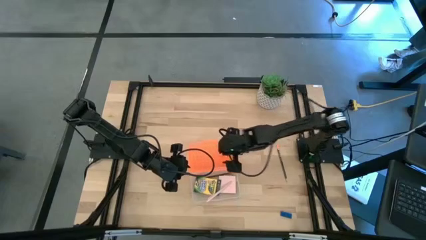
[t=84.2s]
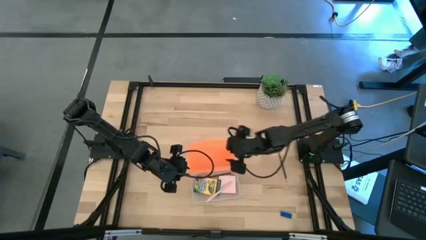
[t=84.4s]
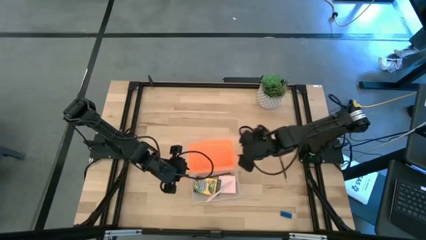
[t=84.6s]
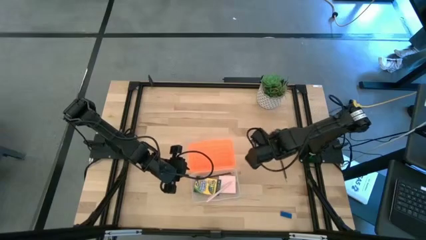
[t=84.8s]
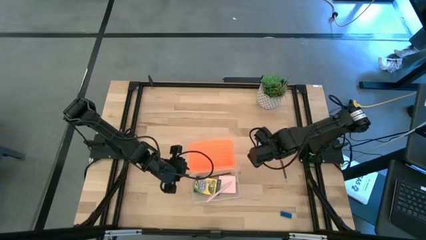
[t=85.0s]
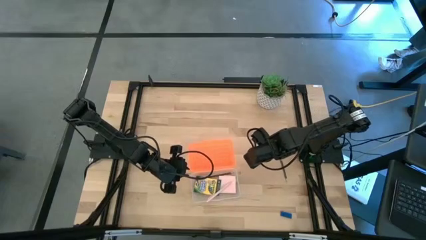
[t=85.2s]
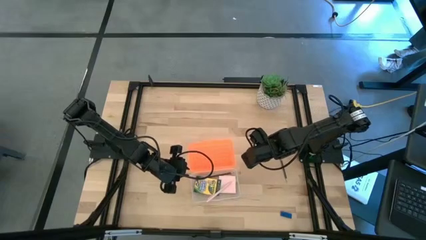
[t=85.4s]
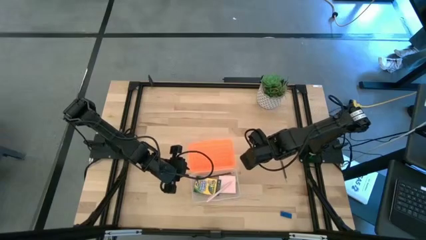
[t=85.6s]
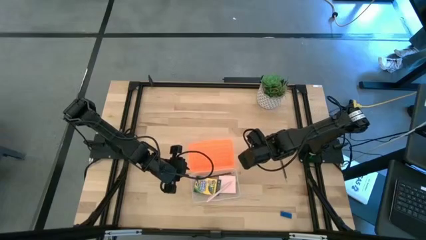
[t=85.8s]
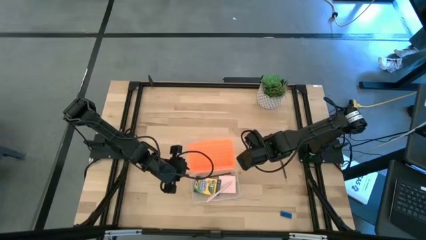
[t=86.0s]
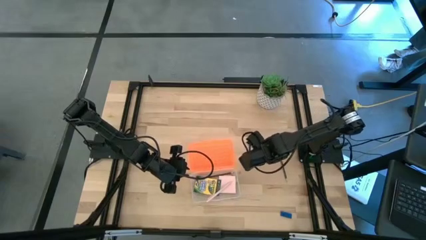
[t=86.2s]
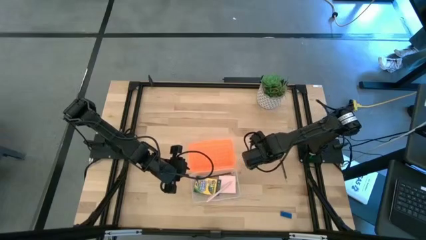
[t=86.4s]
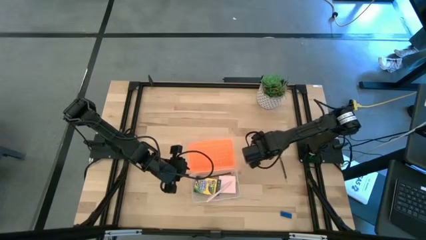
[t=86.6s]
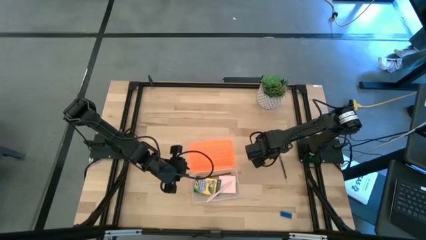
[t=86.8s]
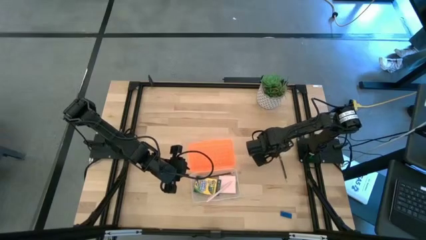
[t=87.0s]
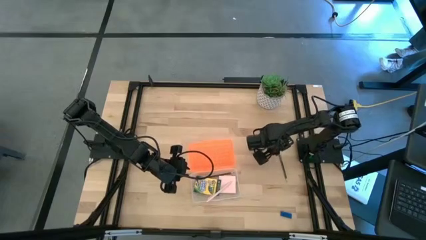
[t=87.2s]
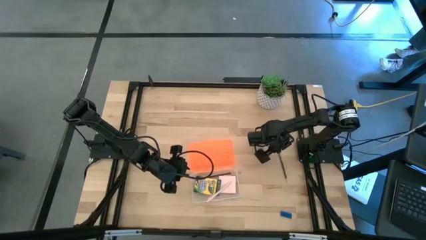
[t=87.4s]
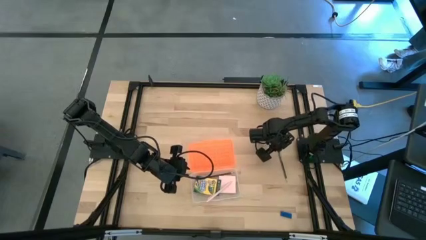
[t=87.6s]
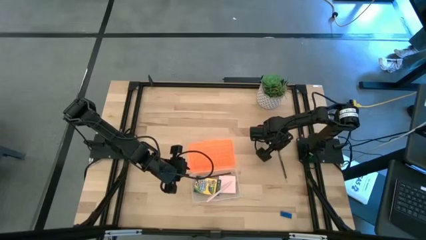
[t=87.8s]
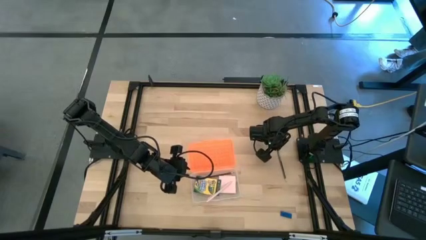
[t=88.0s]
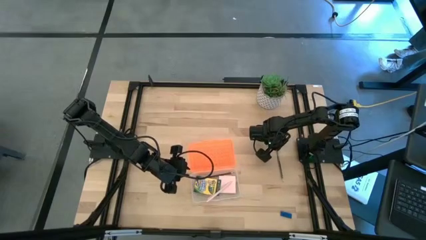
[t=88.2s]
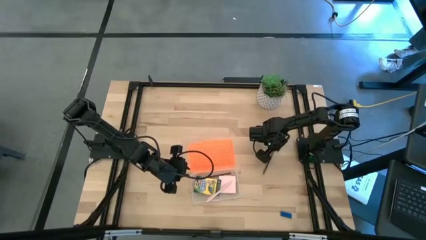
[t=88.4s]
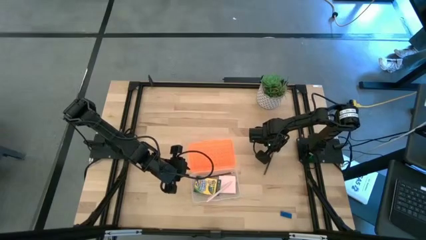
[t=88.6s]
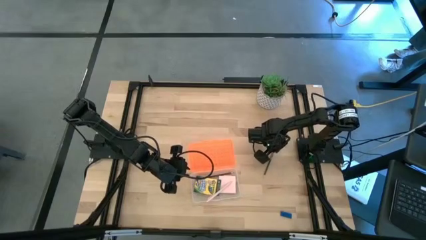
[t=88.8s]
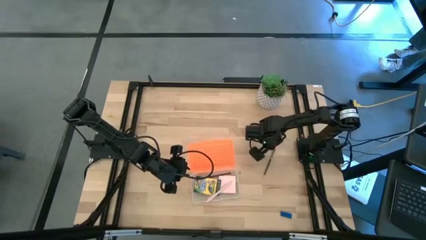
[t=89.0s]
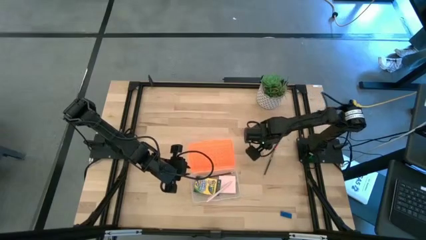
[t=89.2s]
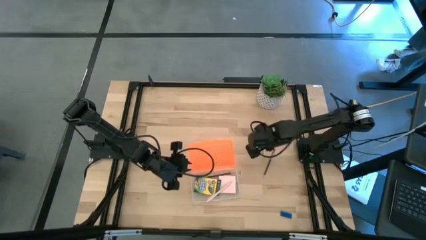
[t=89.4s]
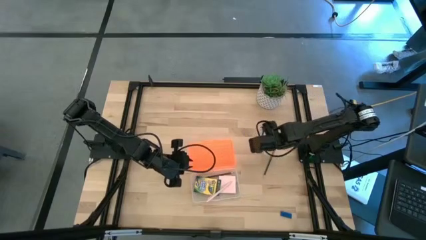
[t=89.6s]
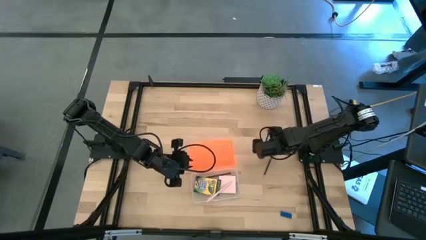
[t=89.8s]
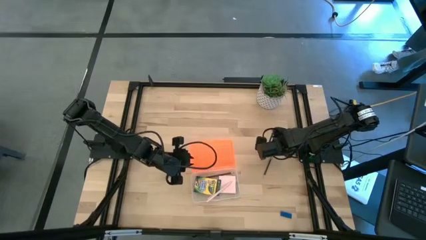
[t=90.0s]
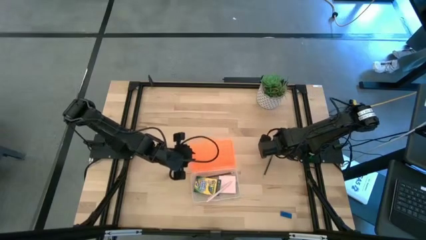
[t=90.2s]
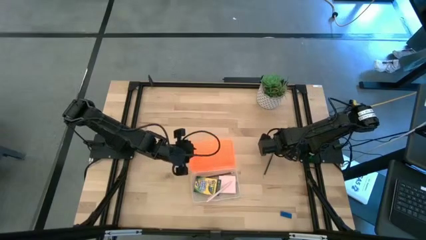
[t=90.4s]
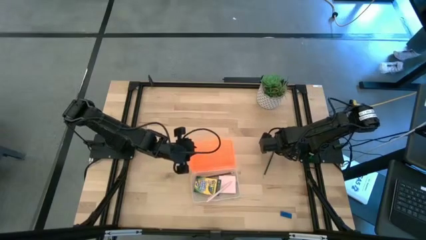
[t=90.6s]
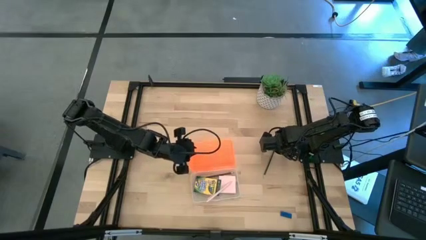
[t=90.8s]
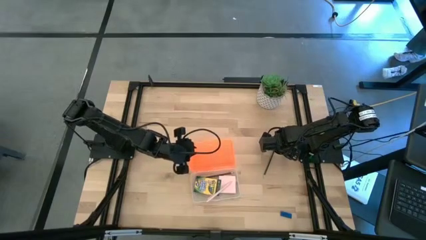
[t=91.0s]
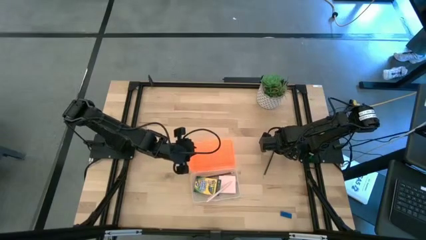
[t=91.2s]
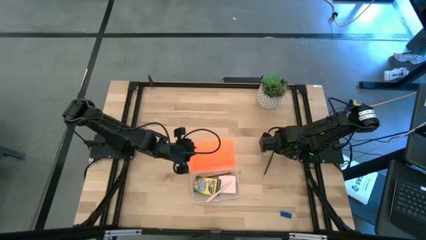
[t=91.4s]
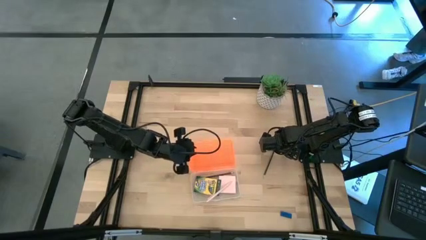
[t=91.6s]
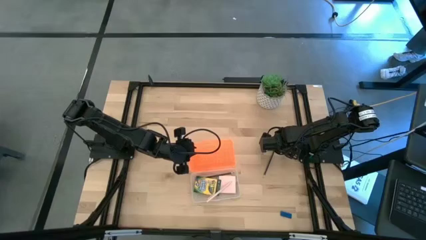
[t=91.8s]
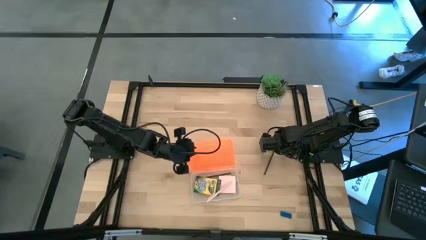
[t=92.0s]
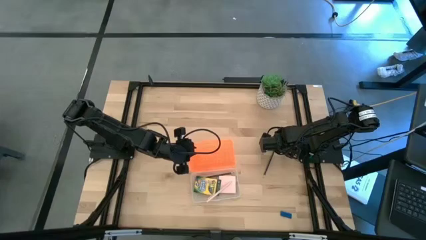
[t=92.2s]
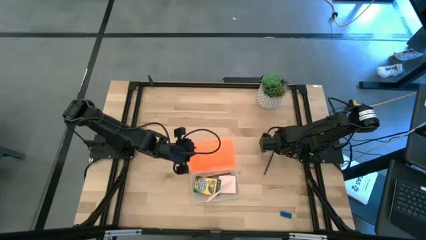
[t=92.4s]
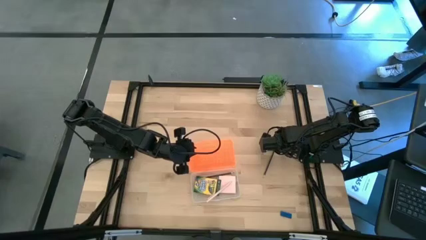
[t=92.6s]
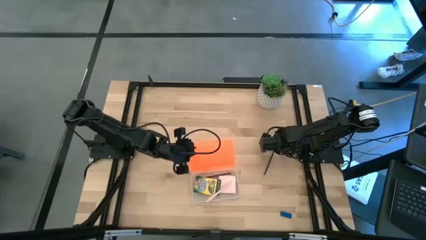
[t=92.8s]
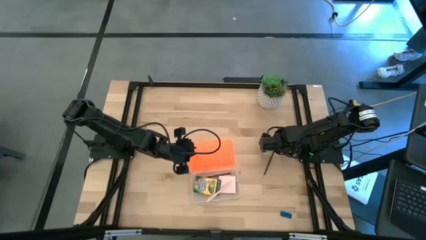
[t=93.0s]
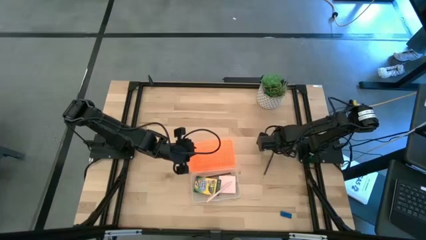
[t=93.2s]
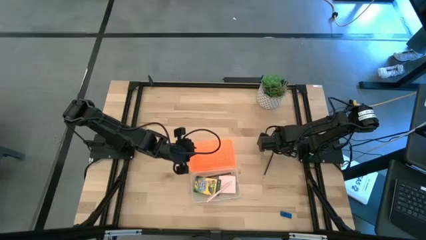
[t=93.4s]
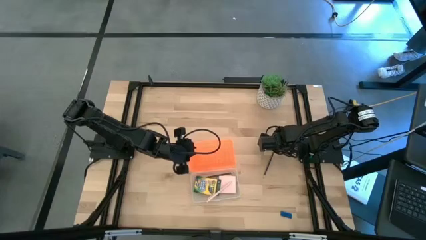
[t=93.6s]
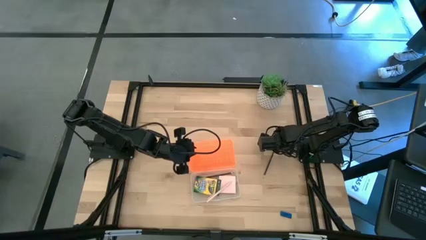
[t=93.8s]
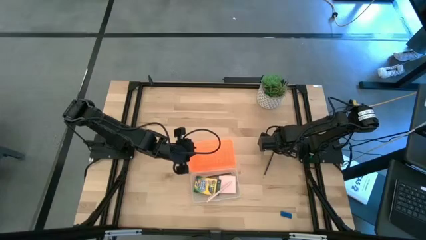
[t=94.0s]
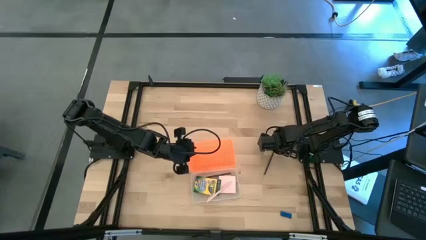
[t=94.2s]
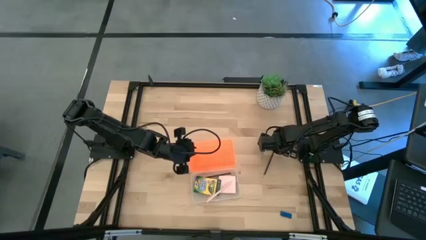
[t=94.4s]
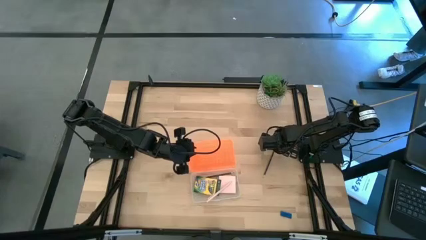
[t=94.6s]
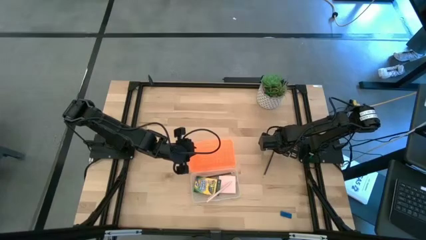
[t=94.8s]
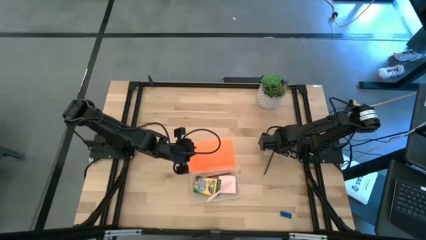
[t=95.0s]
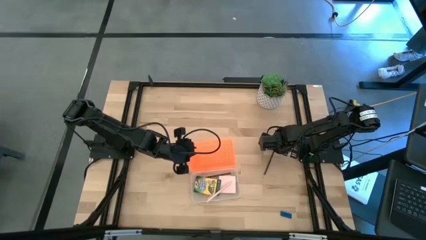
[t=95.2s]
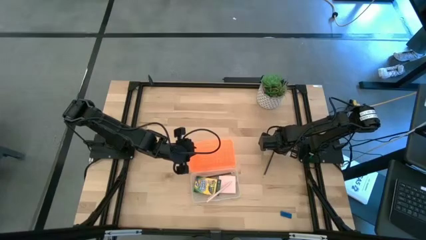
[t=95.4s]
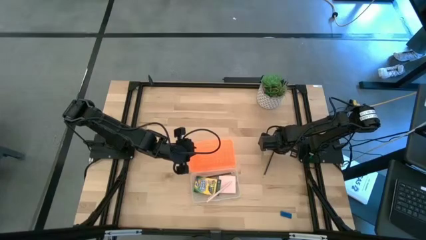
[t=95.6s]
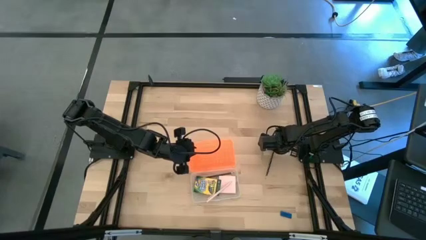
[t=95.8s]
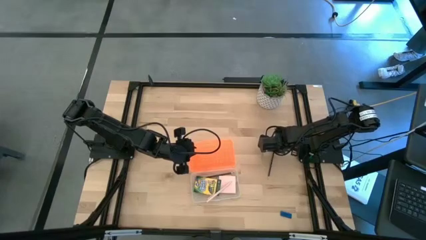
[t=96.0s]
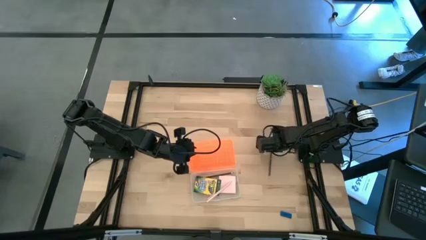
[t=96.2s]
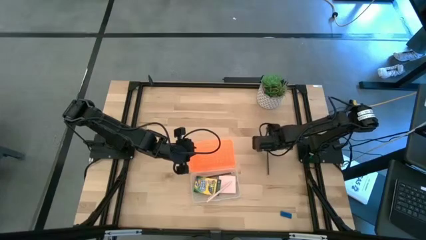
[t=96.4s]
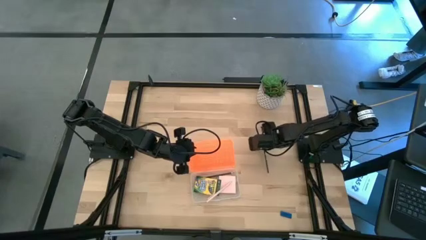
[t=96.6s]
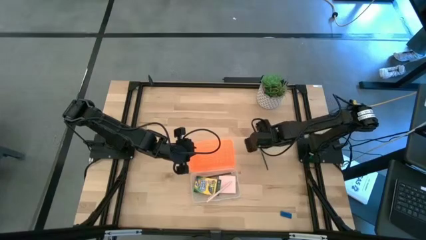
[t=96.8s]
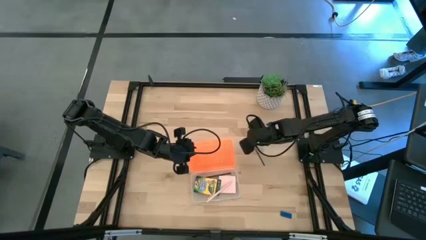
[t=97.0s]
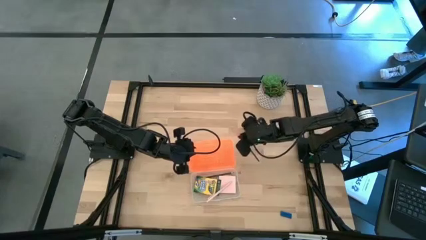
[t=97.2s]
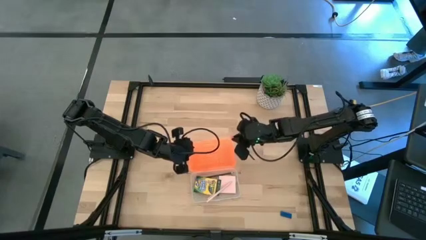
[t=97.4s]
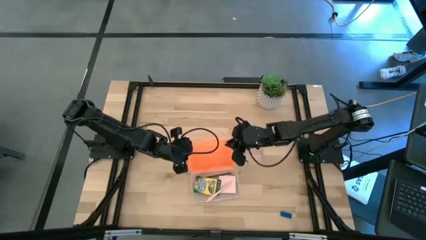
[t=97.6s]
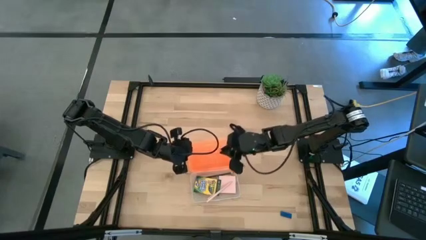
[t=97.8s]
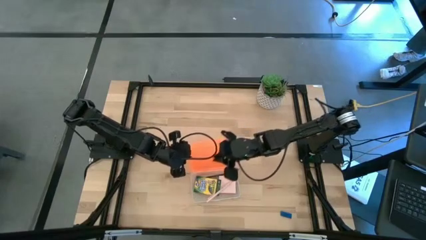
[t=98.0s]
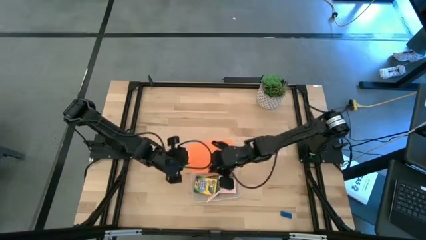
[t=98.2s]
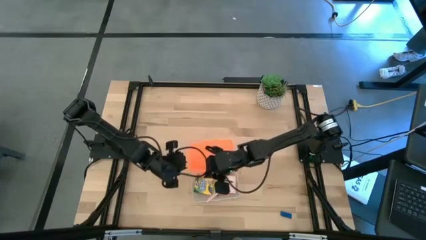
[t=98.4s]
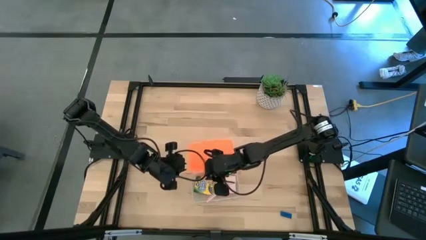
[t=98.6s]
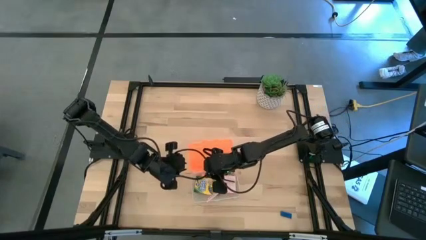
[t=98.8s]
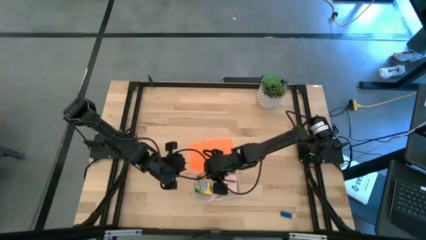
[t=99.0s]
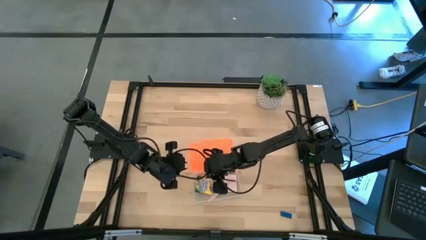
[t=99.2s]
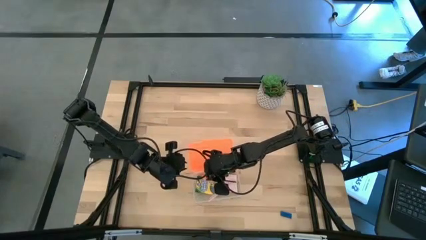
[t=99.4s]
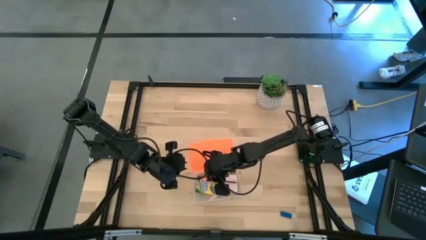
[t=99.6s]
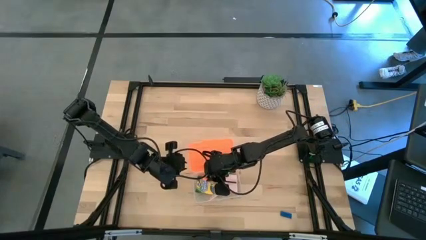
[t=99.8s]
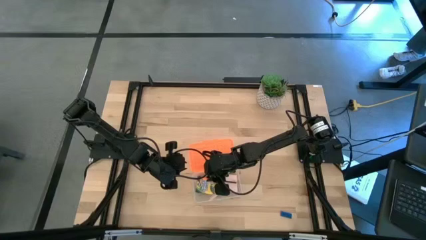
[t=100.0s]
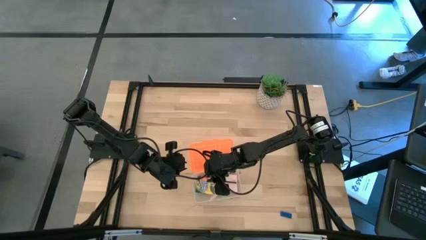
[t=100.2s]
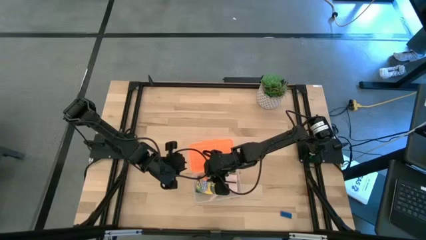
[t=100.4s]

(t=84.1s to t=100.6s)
Task: Pack school essentials
Put the black pencil into the supply box

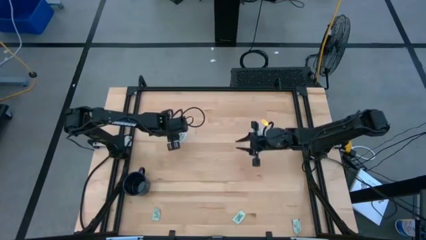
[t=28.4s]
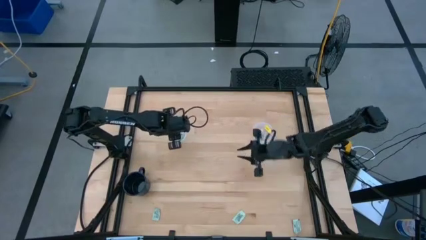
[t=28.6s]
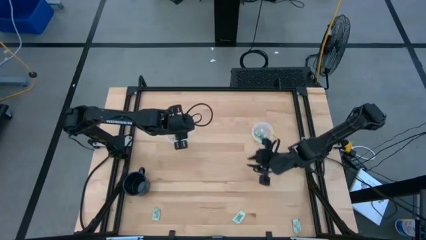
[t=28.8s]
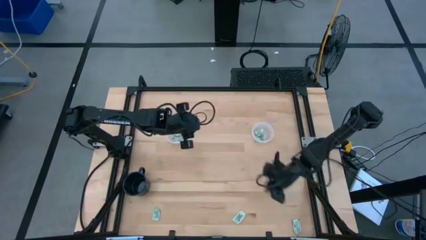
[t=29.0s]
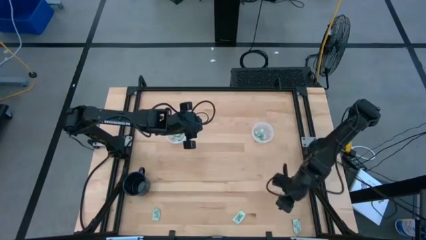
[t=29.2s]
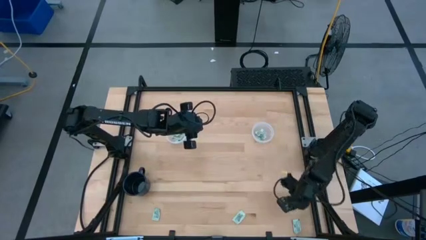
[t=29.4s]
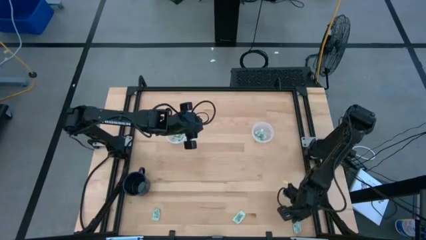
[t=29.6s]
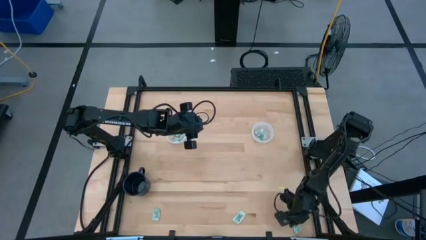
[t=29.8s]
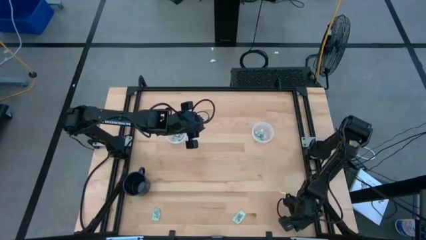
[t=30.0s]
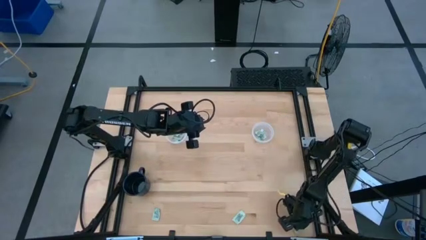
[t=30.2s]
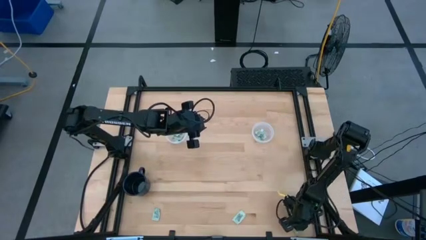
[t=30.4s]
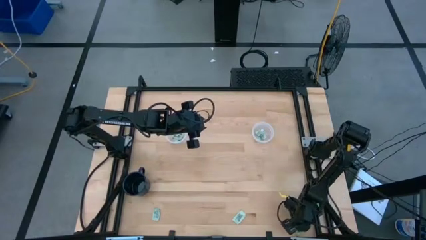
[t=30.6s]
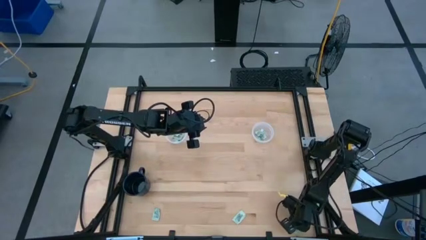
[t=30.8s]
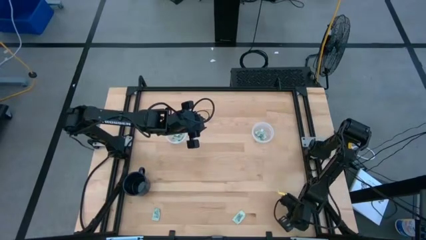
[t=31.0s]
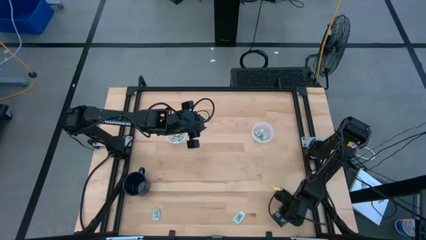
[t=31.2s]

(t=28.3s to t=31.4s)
Task: Pick and place Stevia / Truvia into bins
Put the stevia packet into the right transparent container
